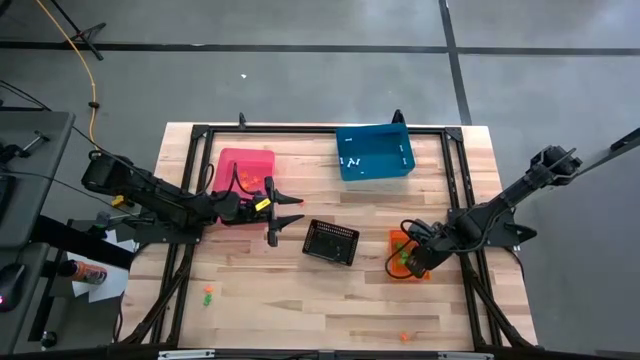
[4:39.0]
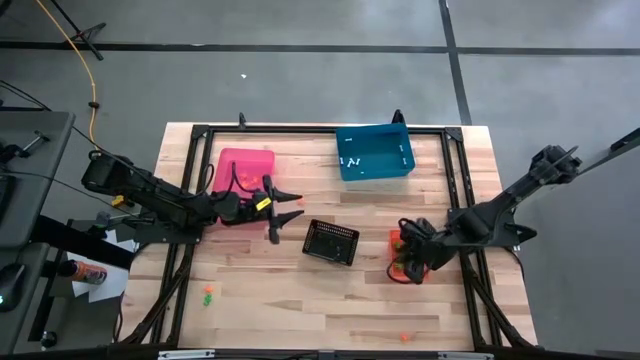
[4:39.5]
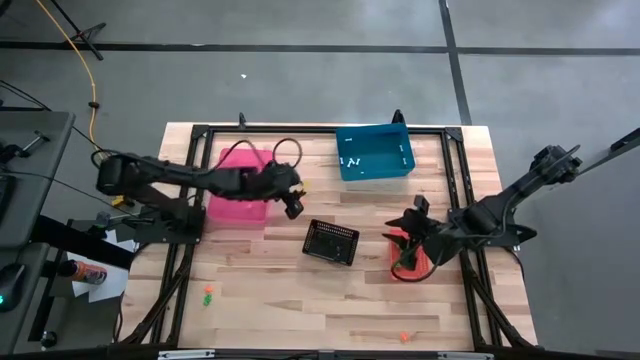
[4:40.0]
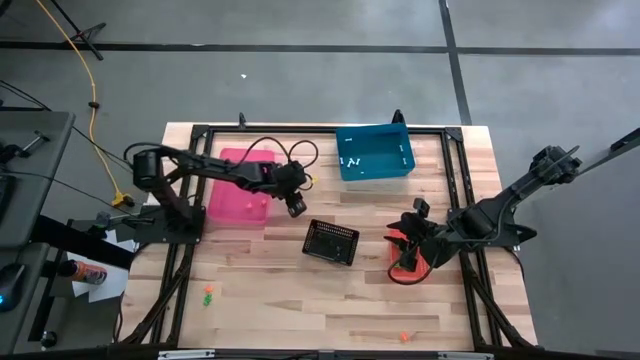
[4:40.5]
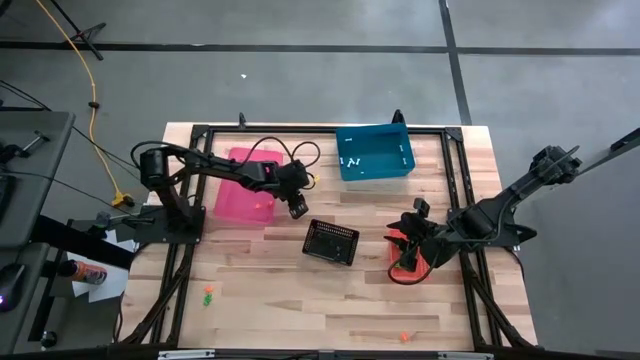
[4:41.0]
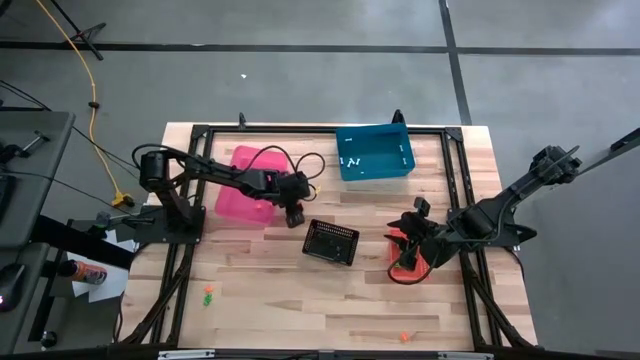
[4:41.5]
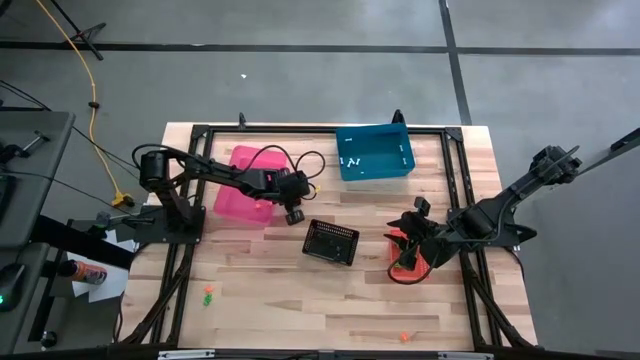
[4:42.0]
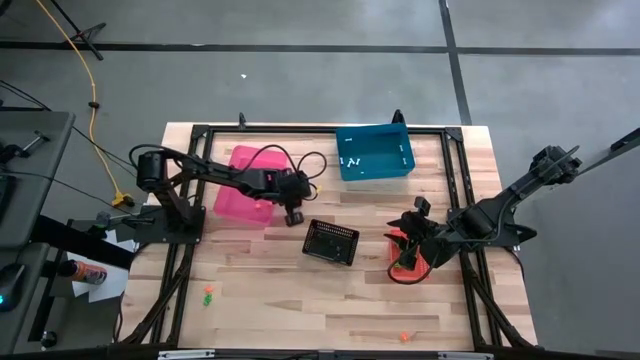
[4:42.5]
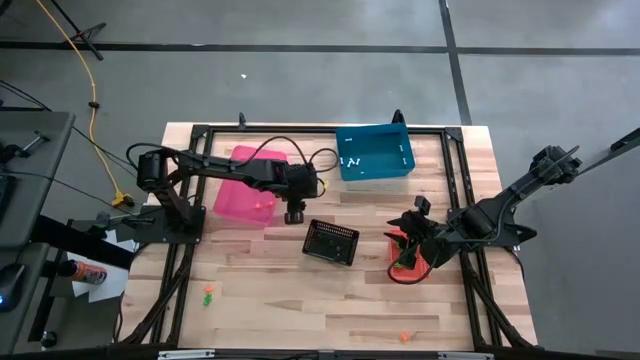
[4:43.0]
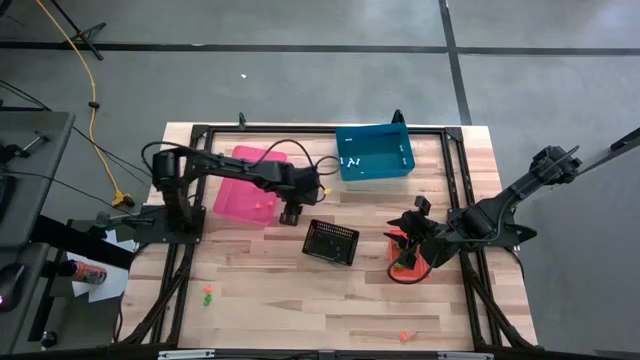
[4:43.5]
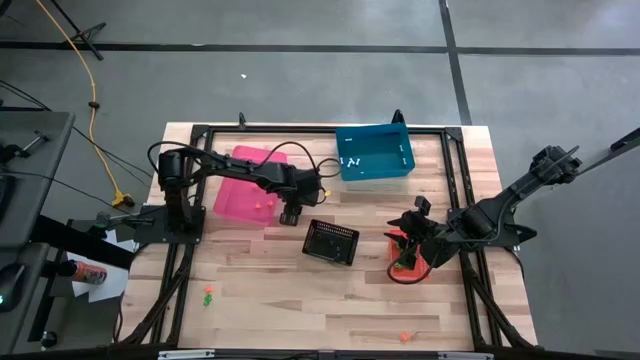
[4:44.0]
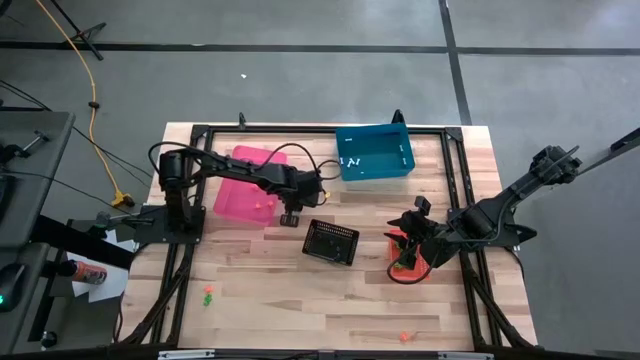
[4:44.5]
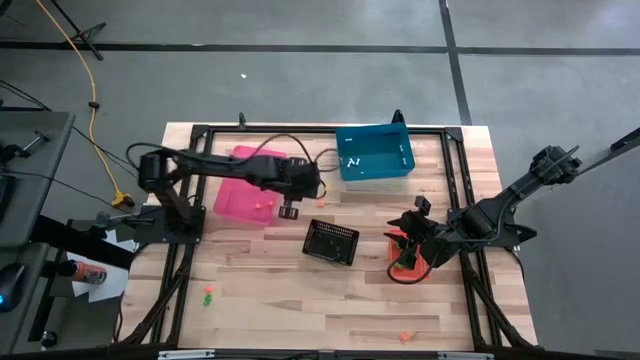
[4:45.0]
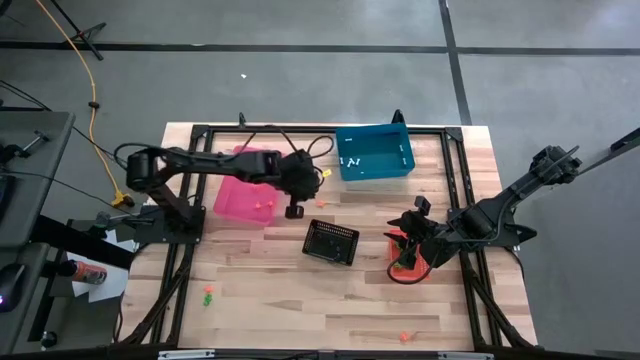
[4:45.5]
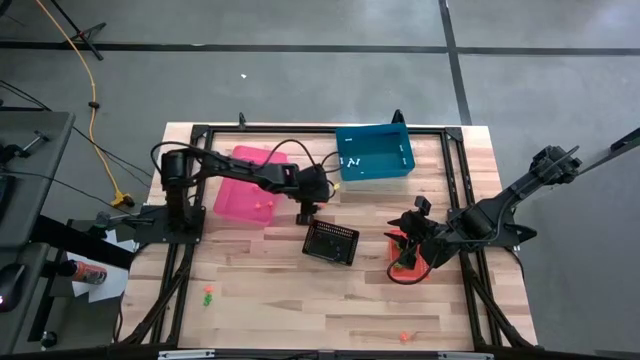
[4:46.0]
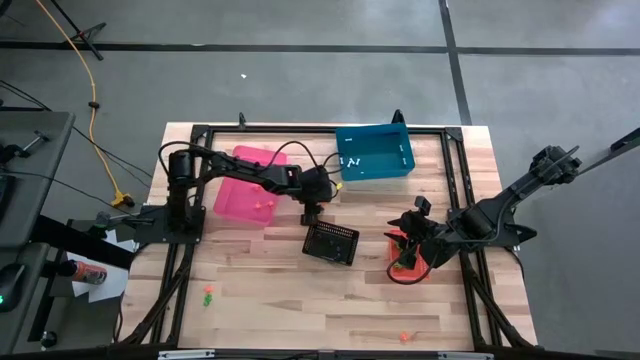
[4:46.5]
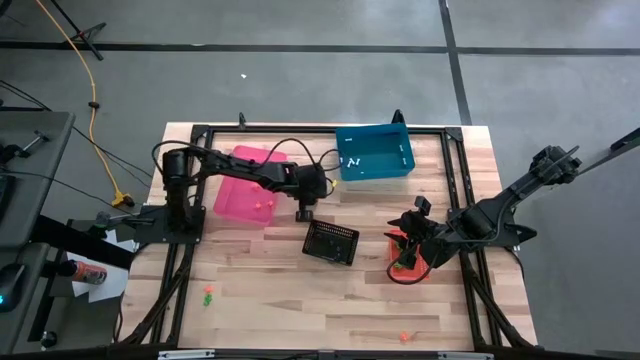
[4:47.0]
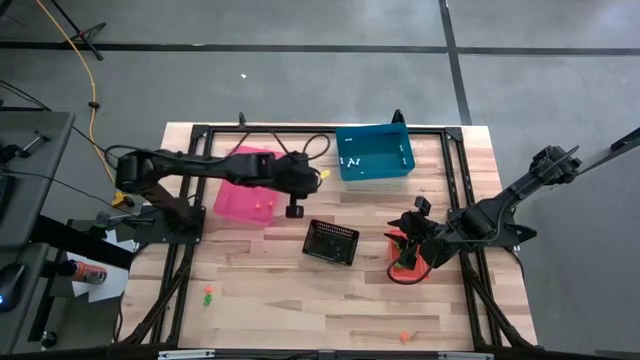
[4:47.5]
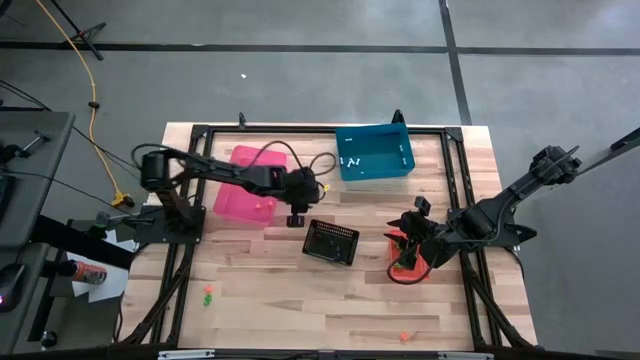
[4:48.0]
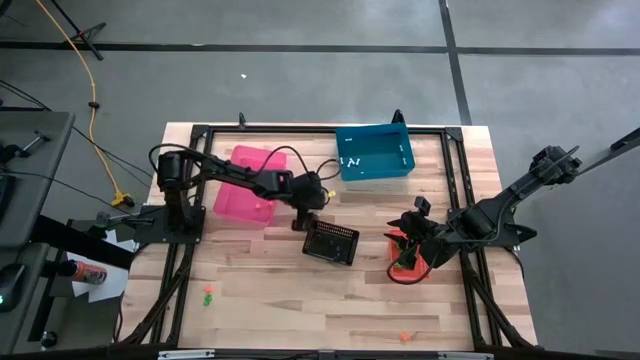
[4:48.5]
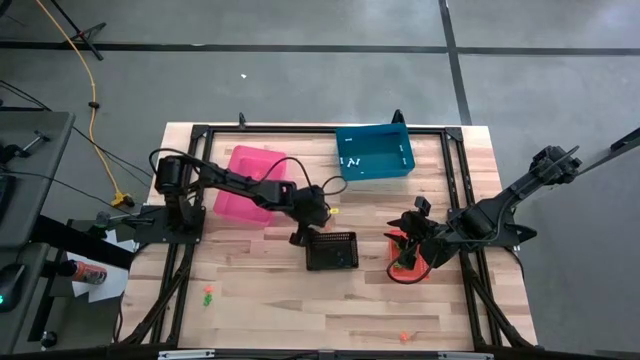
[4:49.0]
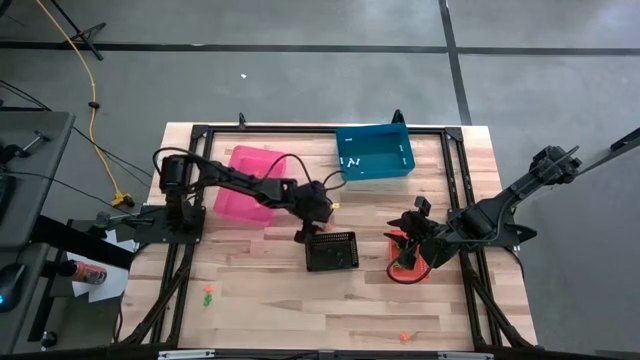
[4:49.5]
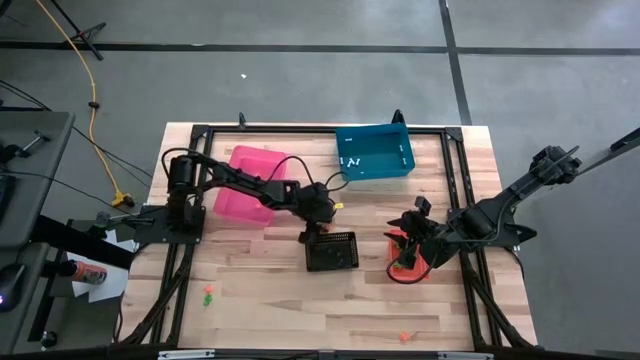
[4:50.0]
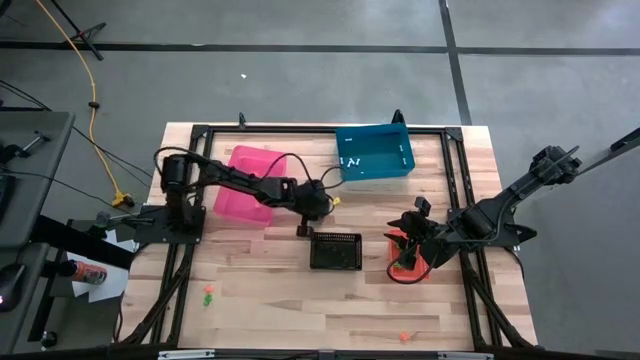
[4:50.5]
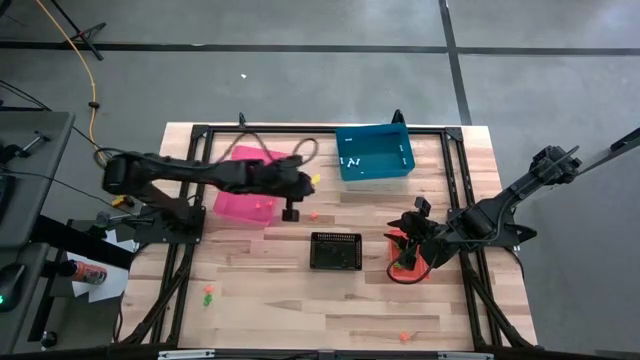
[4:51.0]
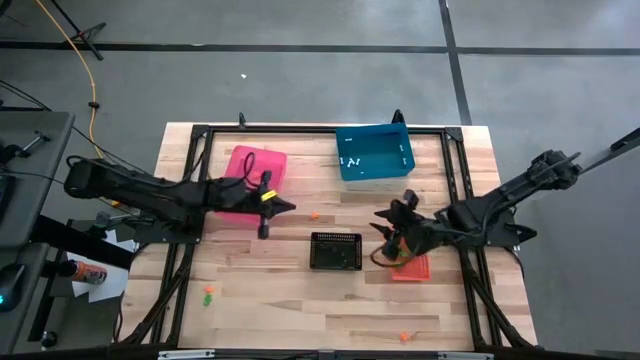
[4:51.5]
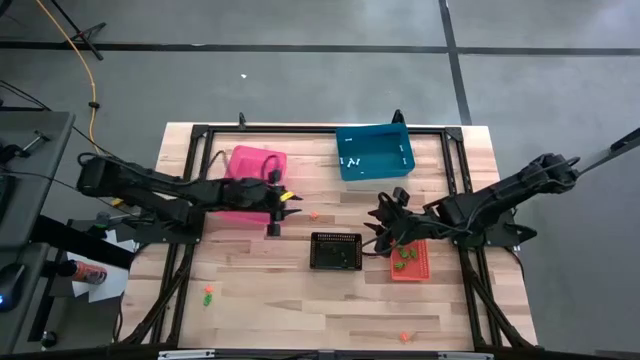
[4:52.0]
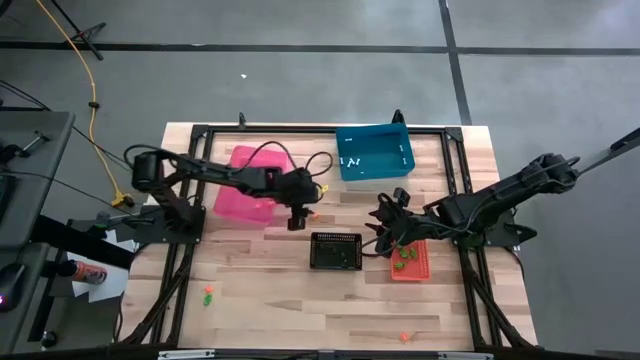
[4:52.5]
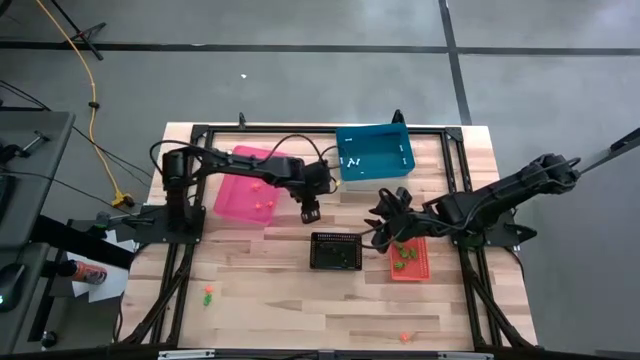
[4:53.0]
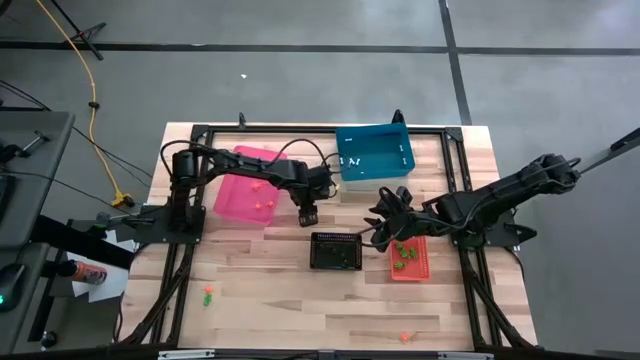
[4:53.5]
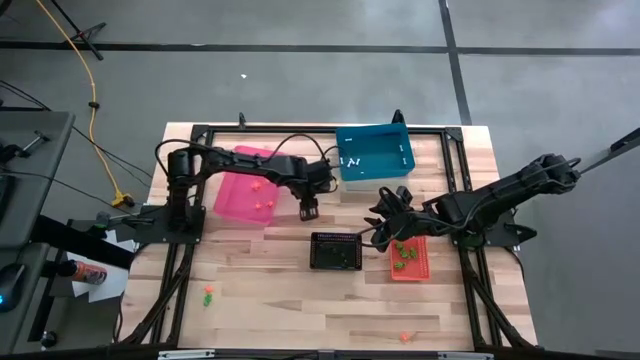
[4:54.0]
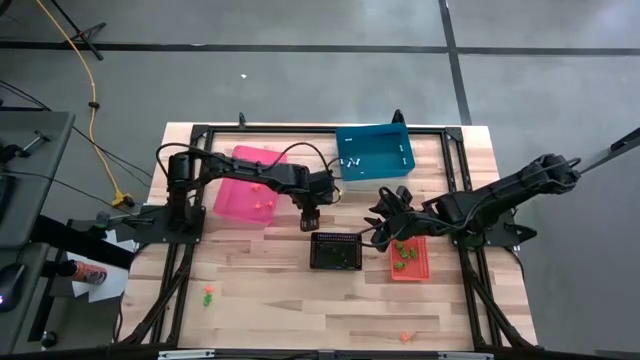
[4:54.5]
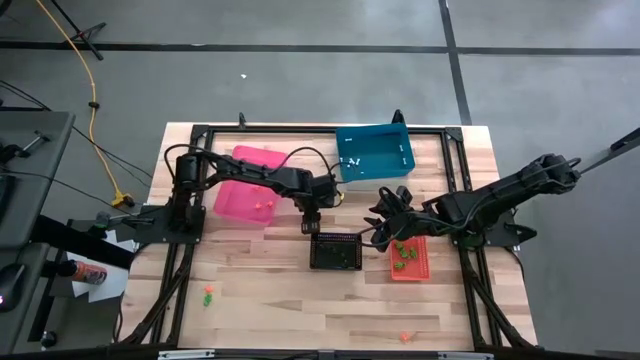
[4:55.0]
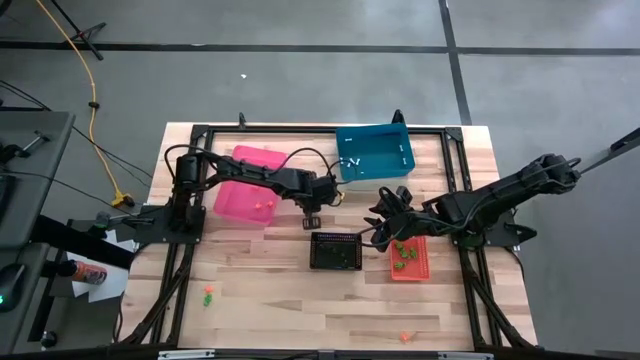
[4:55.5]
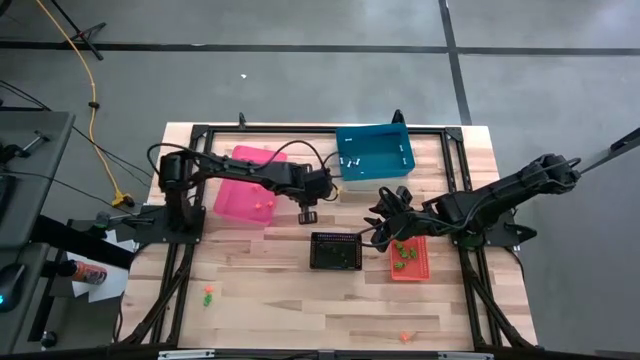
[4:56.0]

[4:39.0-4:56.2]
Task: Sort Halloween decoration
Put the orange spider toy into the pink bin

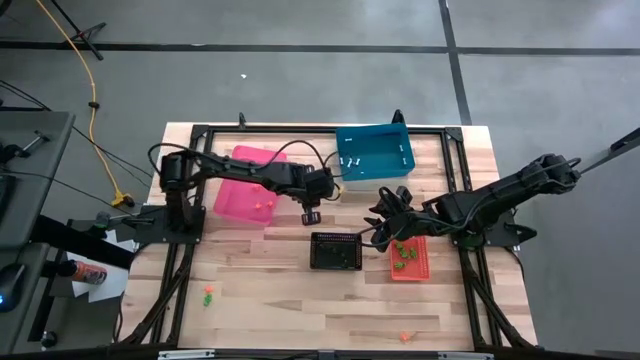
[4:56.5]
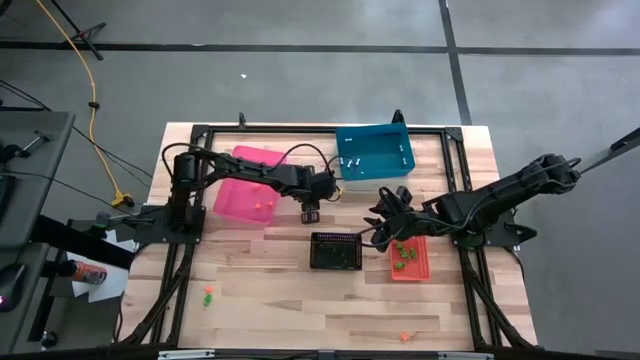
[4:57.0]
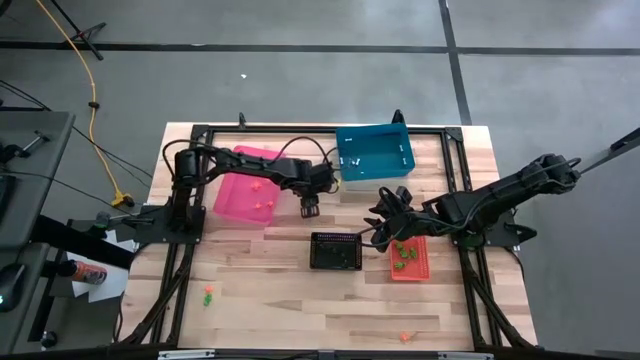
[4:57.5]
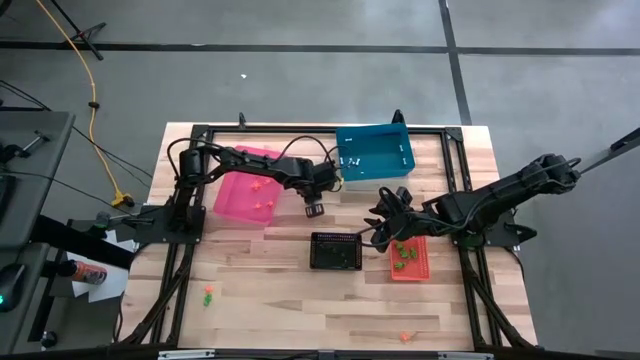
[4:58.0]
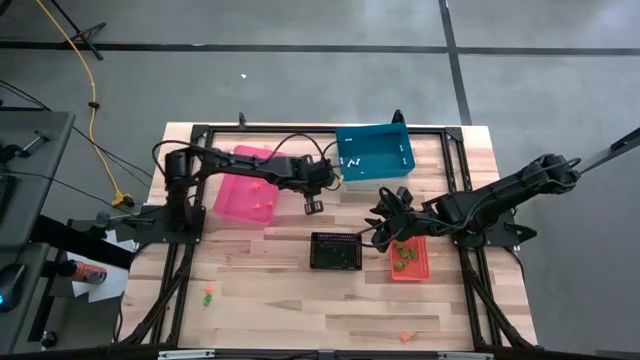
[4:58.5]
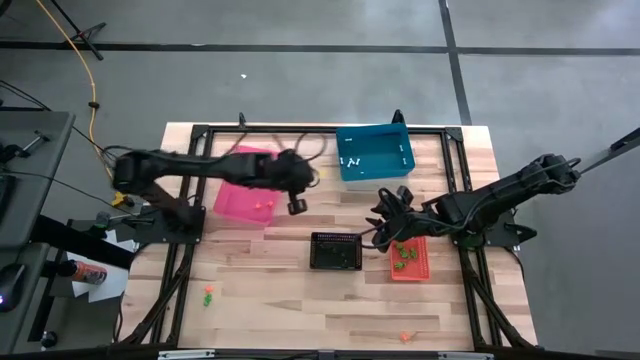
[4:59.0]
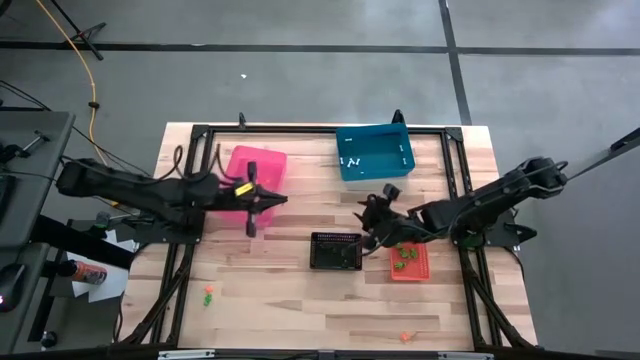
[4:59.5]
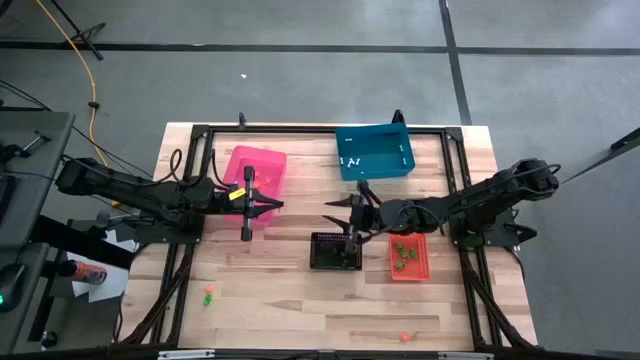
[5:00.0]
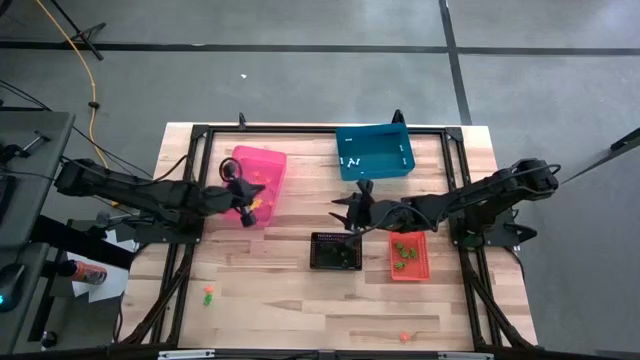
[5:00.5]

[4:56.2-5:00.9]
Put the orange spider toy into the pink bin
